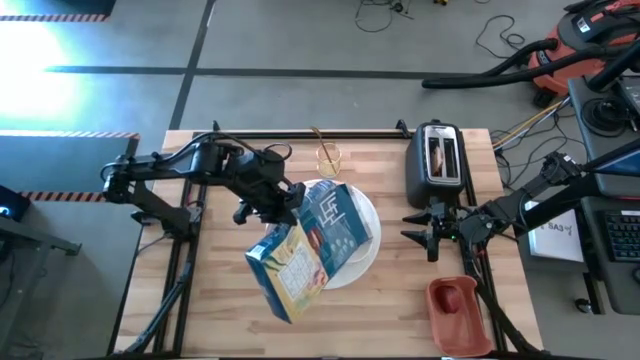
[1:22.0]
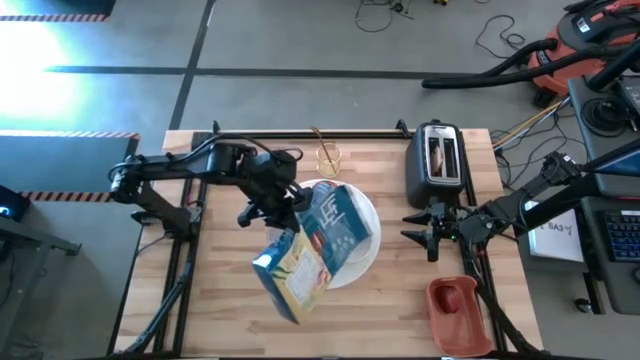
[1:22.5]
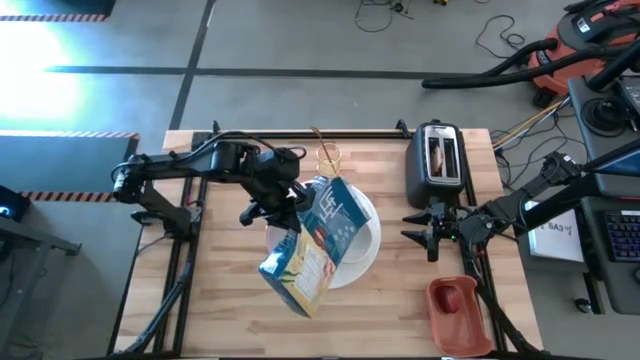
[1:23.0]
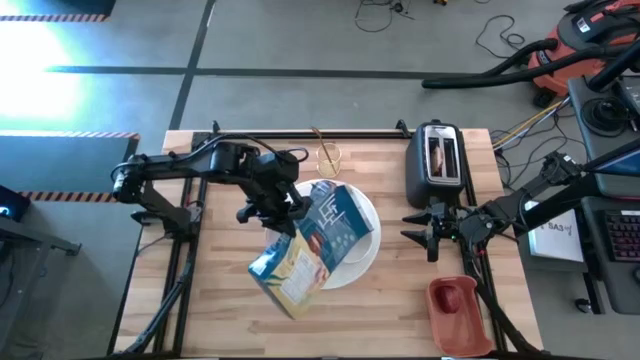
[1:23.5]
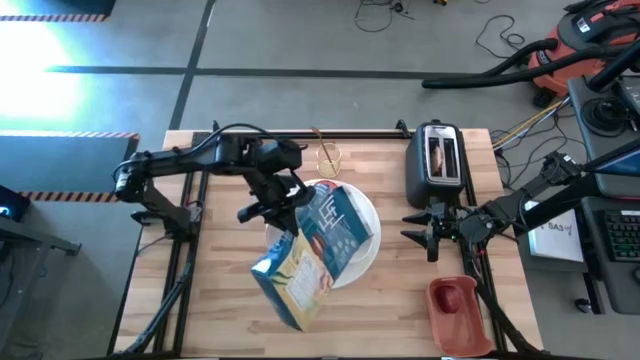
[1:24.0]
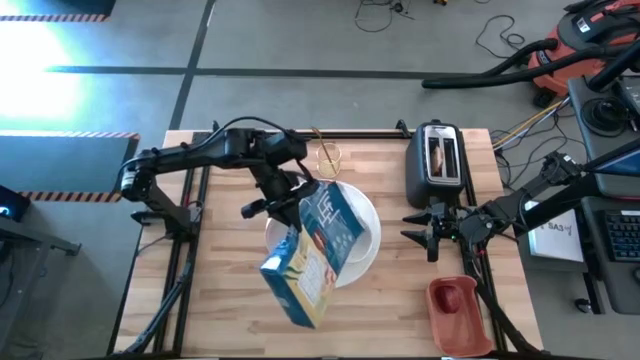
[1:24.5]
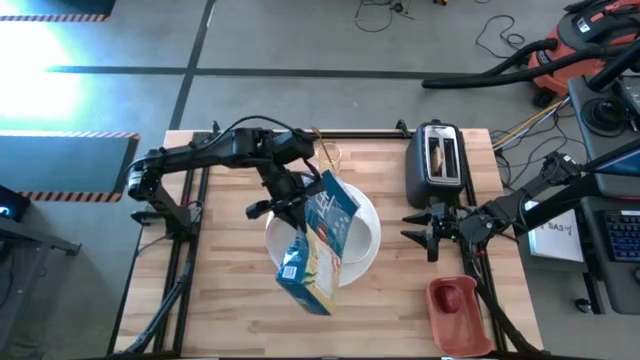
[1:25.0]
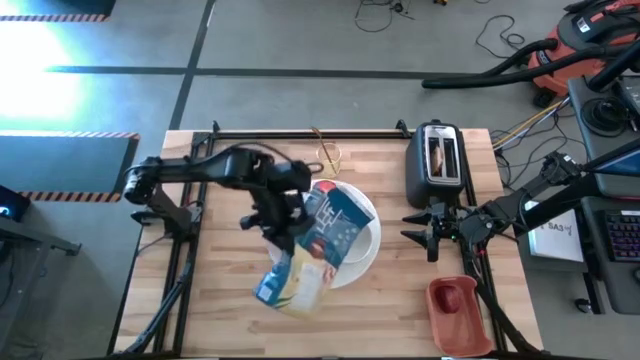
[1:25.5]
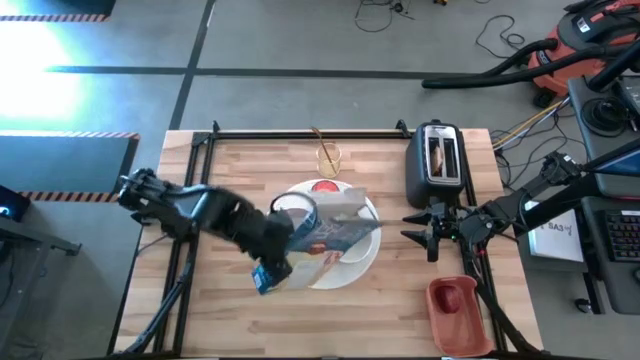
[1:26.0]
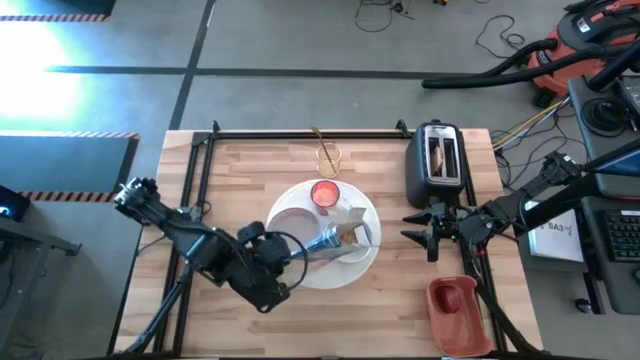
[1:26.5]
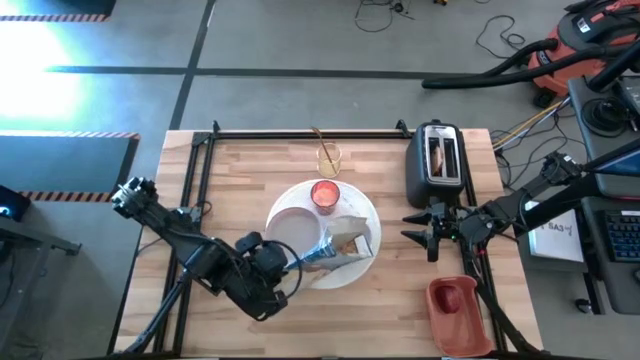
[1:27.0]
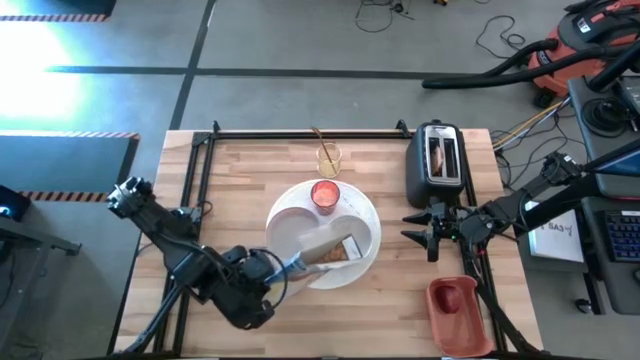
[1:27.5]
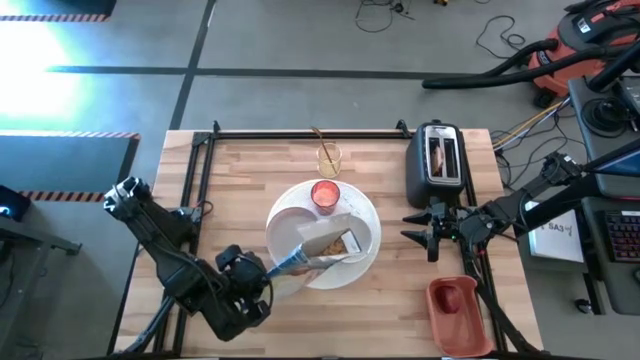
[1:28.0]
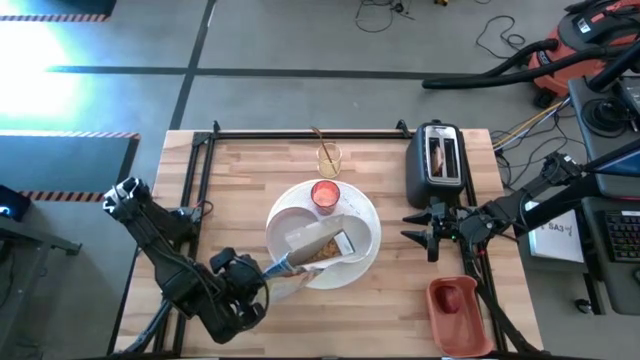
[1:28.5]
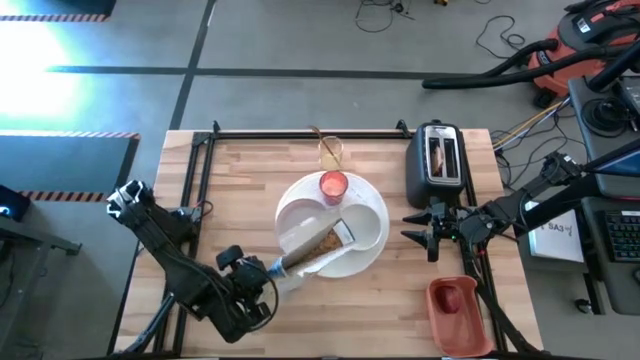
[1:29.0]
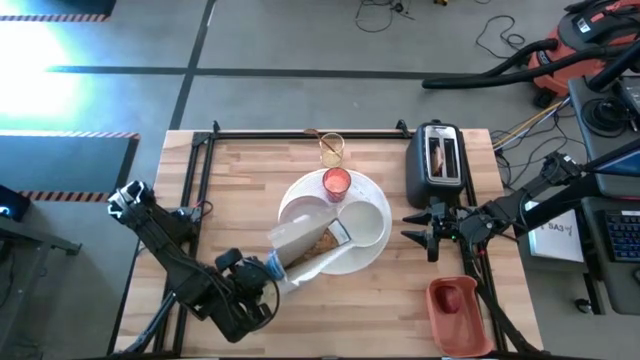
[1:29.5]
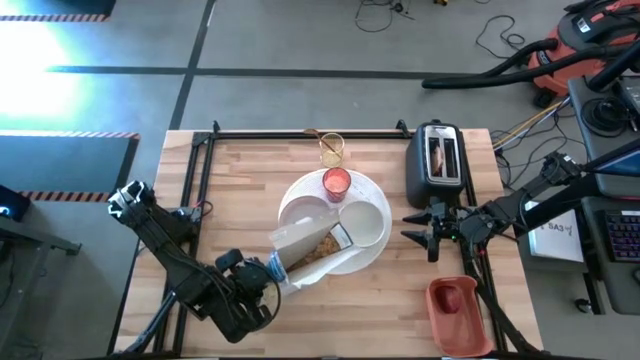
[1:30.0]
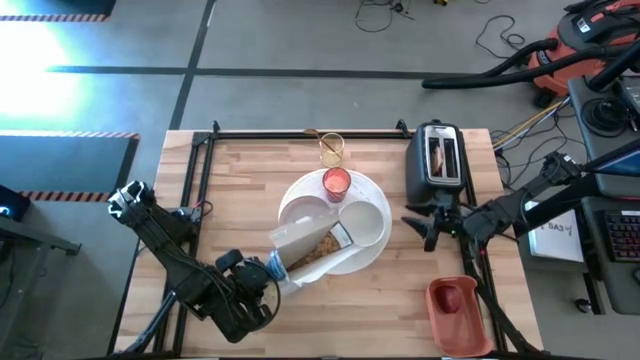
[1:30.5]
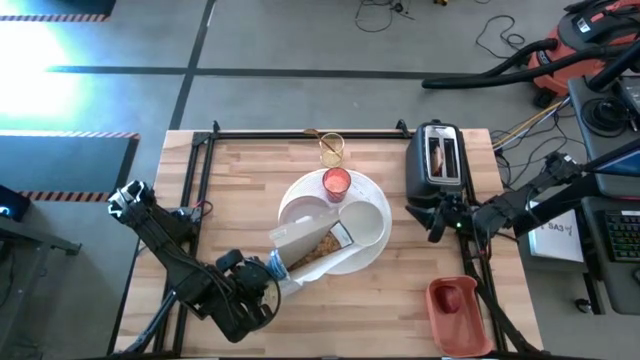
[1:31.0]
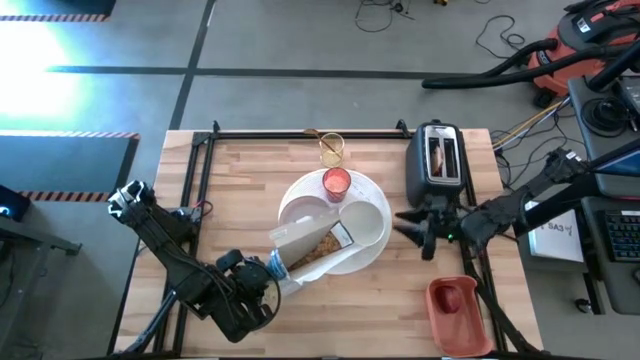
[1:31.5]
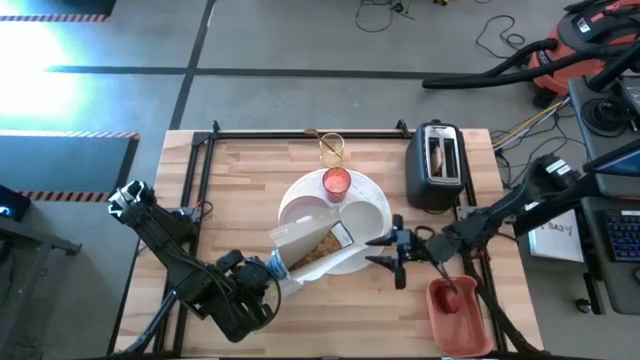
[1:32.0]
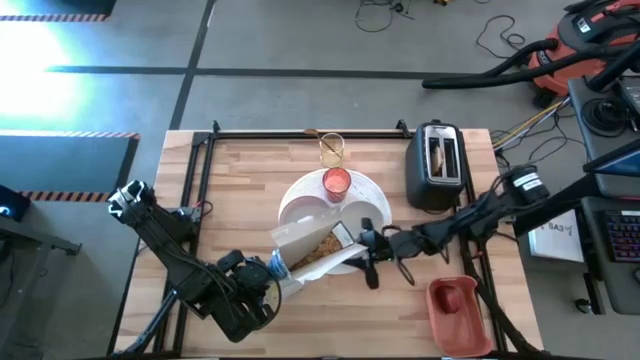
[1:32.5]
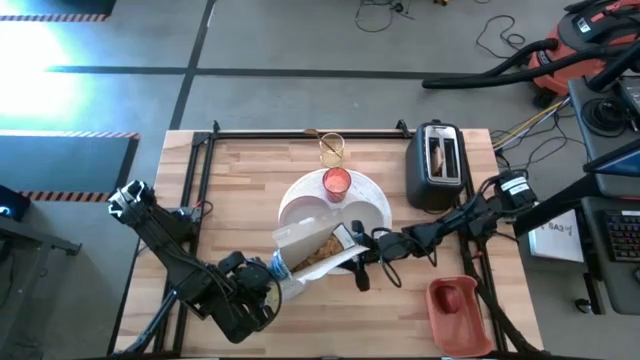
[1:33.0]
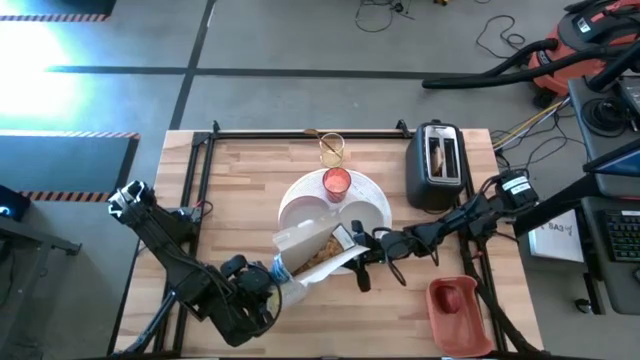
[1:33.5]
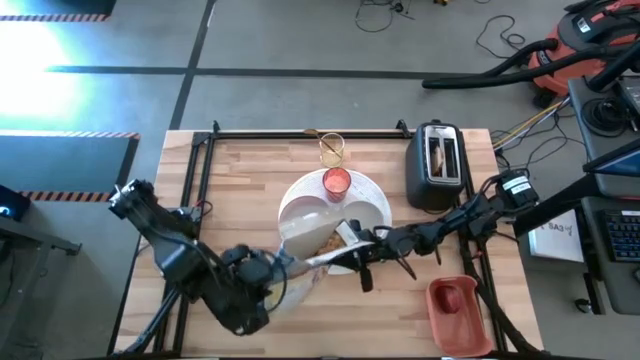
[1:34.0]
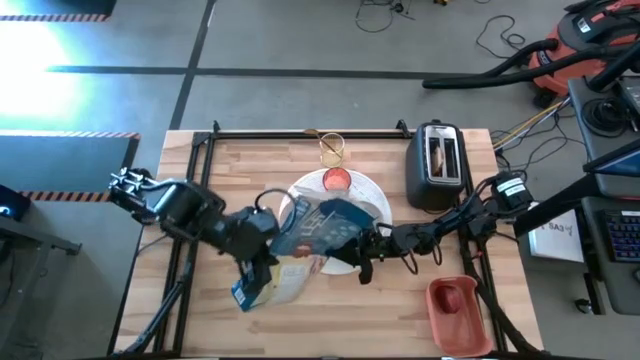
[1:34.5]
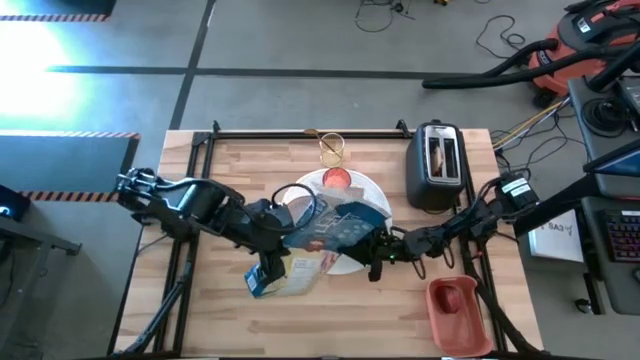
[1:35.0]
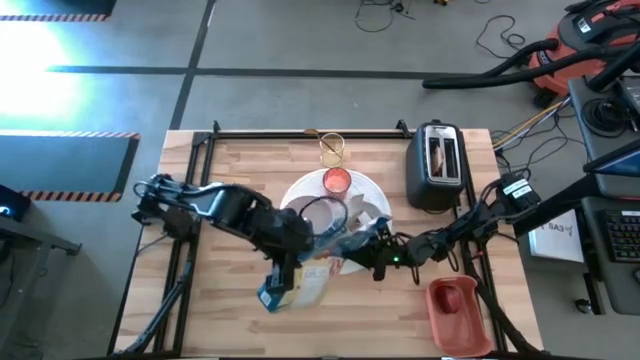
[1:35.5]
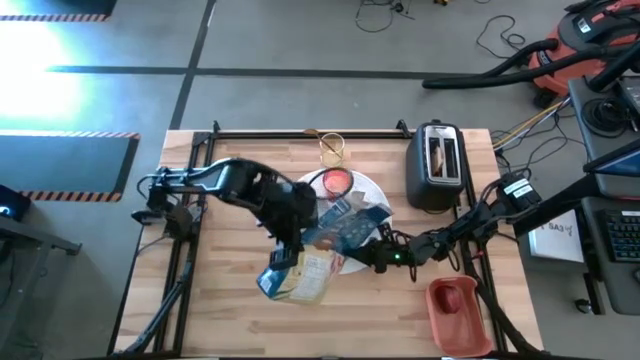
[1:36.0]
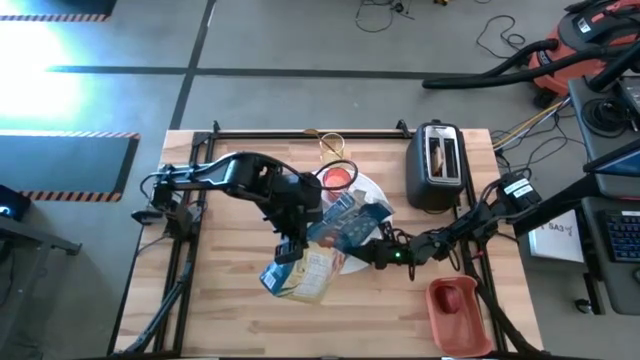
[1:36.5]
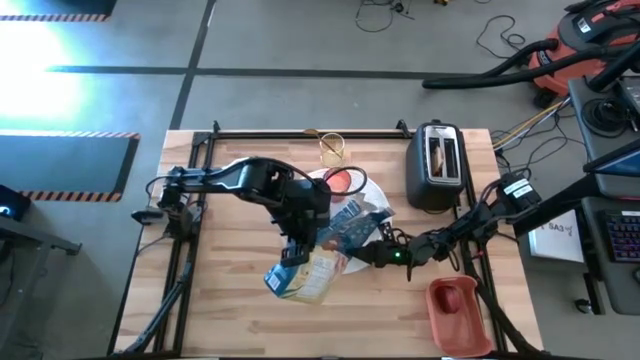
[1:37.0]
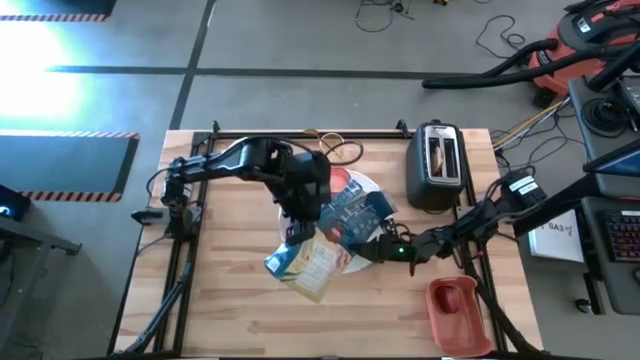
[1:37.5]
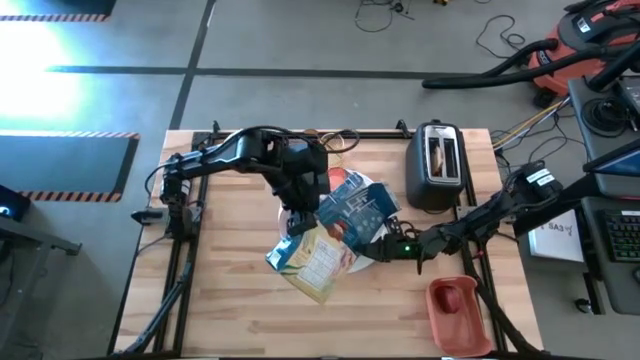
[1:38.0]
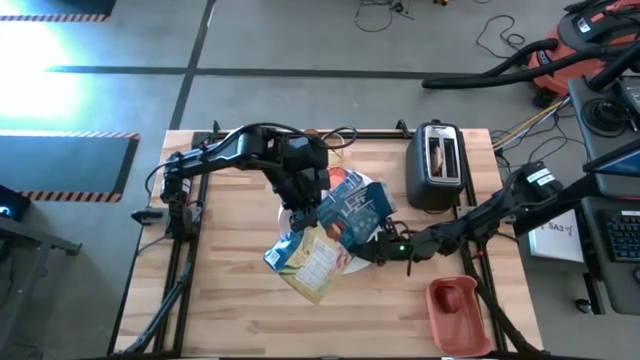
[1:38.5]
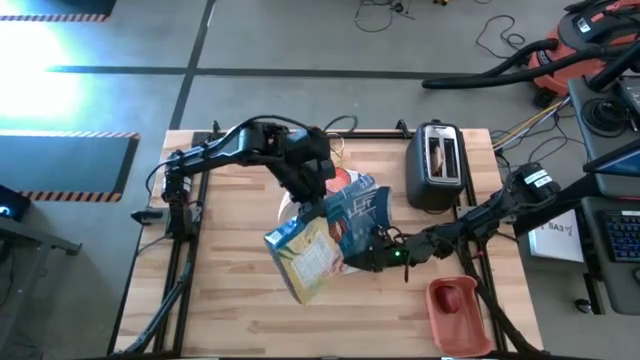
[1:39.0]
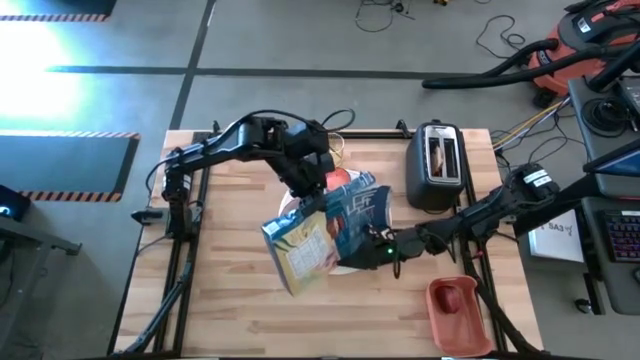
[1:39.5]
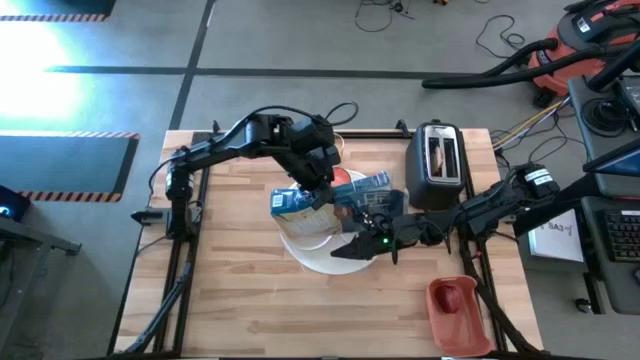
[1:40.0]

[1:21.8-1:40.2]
Task: Arrange a breakfast setting
Pour the cereal from the cereal box into the white bowl

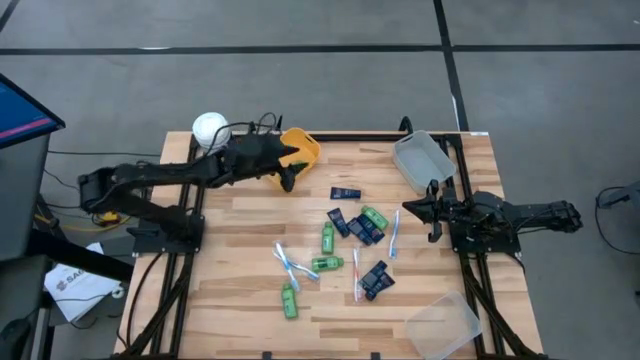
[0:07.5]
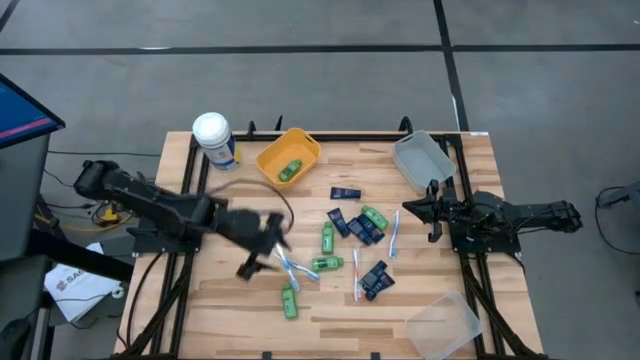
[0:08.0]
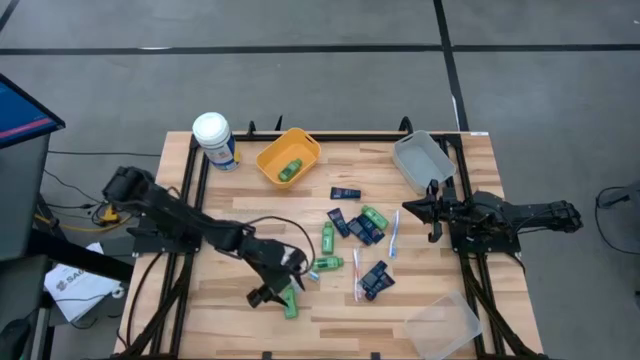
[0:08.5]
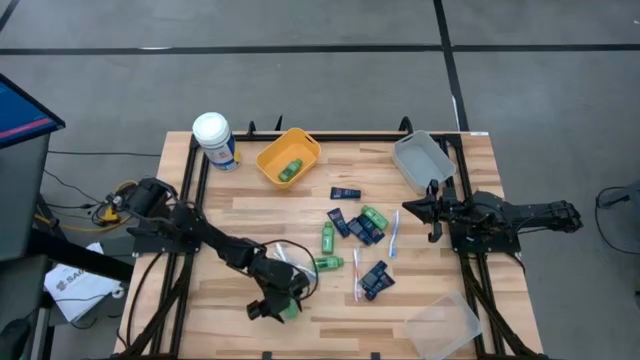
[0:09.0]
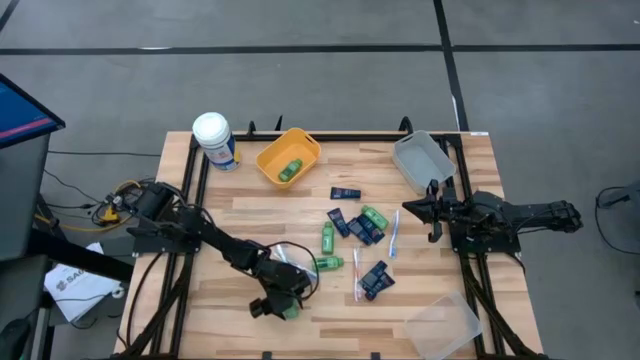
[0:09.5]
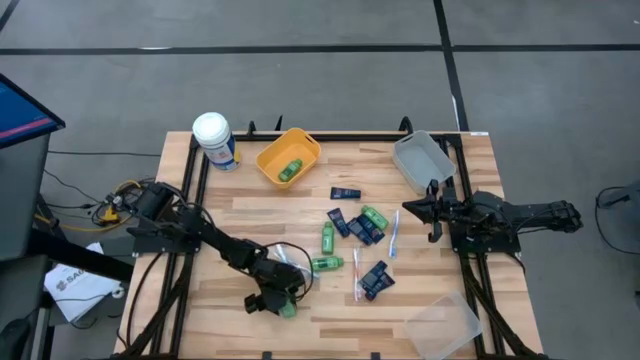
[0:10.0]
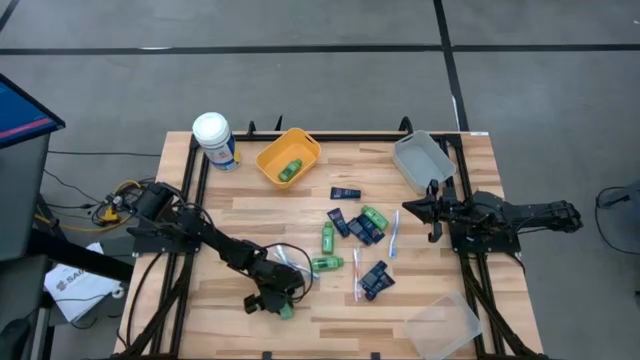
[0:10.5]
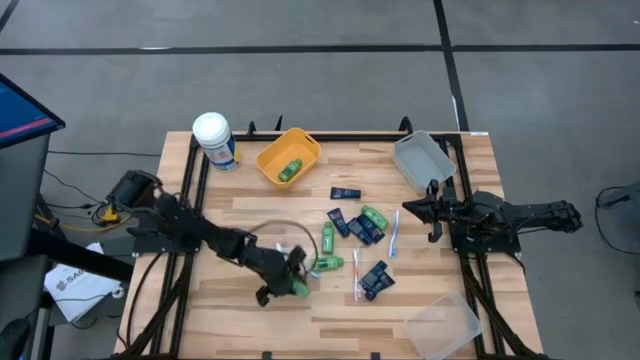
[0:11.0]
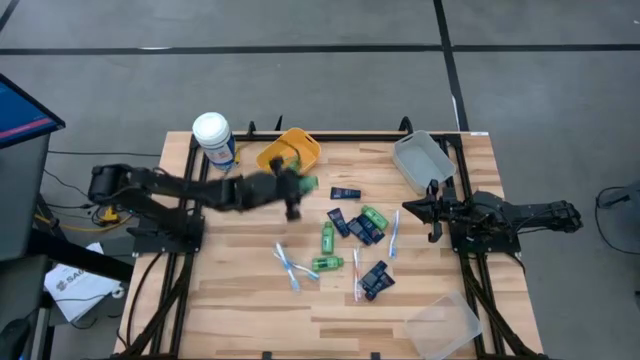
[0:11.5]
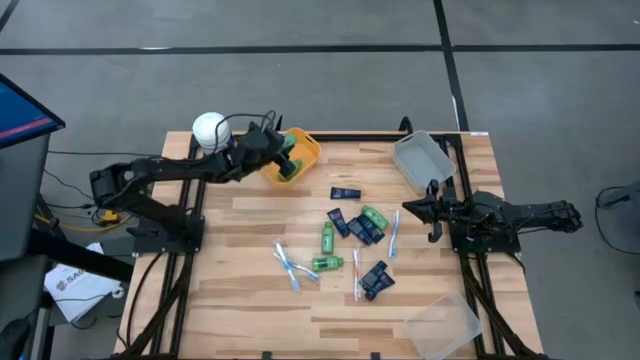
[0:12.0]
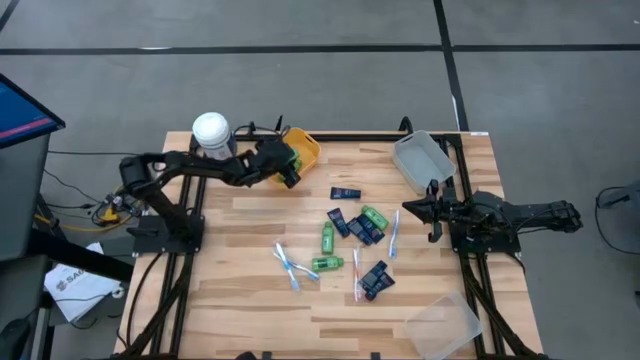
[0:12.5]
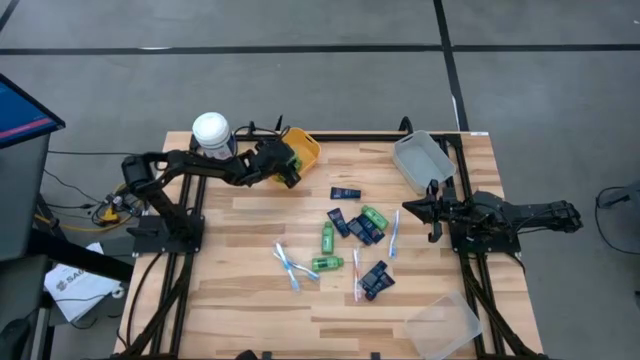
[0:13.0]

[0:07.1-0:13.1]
Task: Pick & Place Travel size toiletries
Put the green shampoo into the yellow bin
